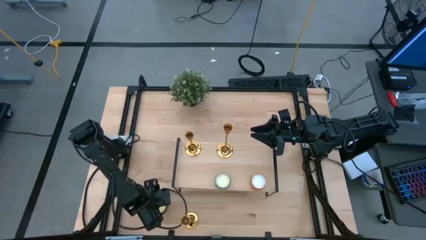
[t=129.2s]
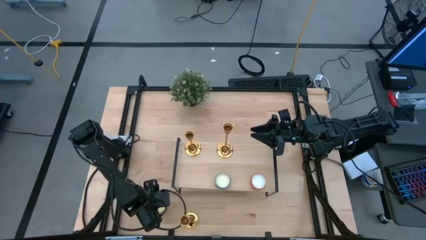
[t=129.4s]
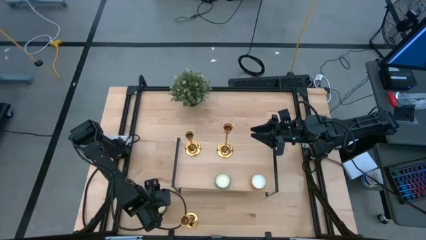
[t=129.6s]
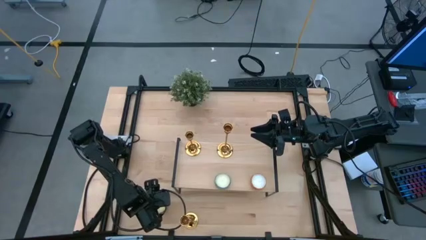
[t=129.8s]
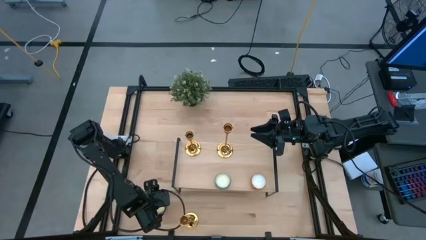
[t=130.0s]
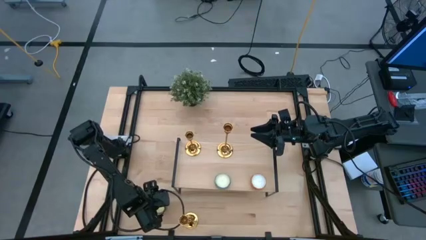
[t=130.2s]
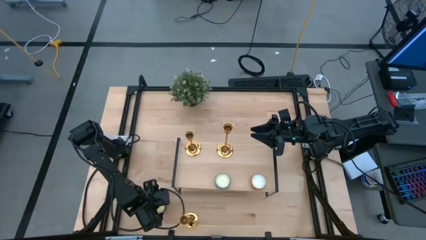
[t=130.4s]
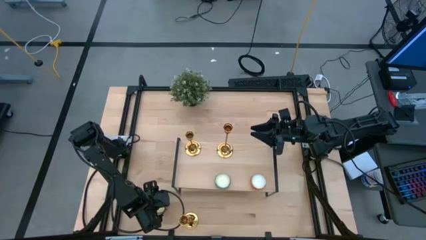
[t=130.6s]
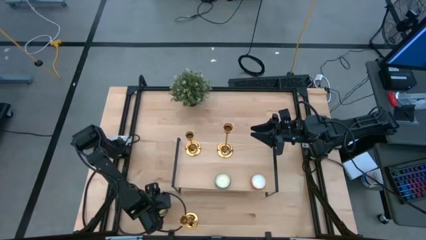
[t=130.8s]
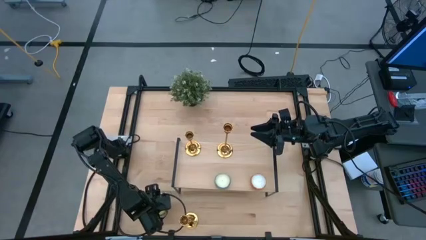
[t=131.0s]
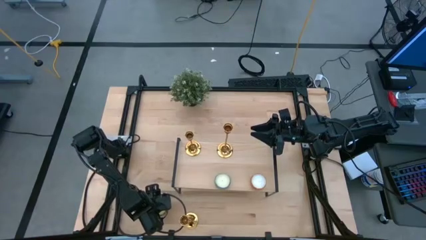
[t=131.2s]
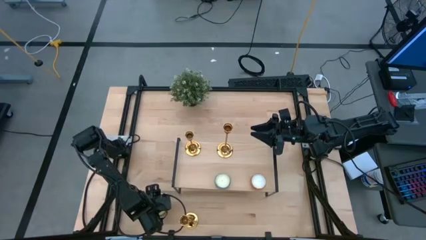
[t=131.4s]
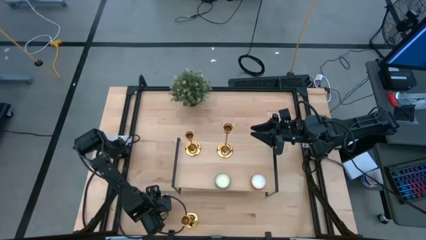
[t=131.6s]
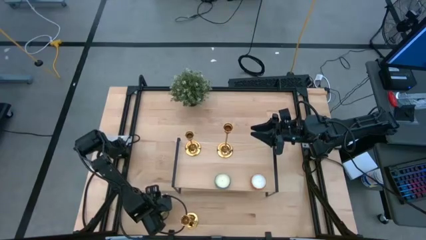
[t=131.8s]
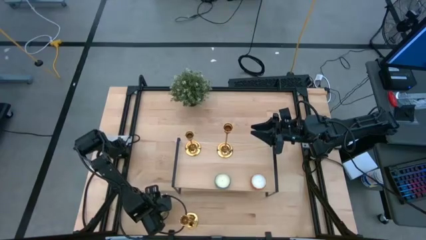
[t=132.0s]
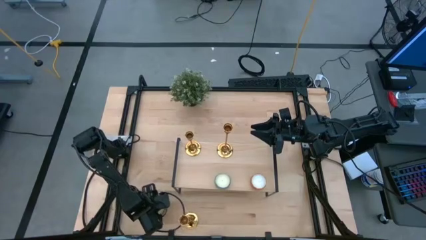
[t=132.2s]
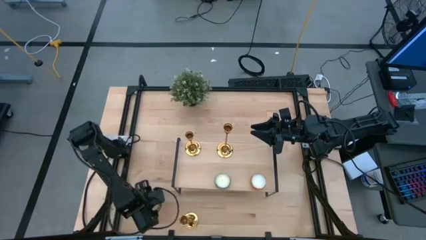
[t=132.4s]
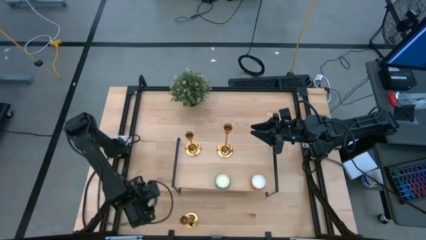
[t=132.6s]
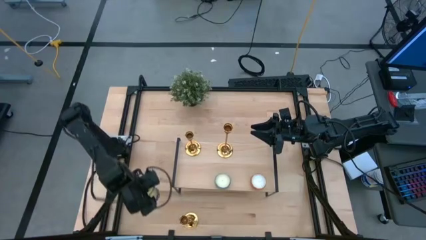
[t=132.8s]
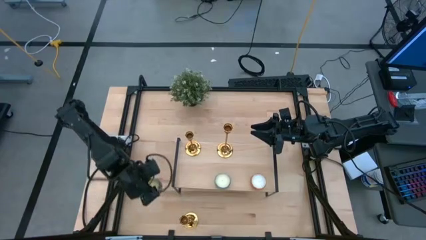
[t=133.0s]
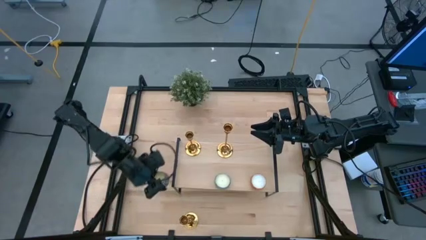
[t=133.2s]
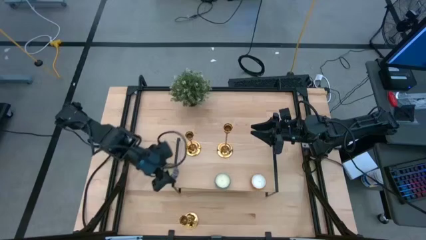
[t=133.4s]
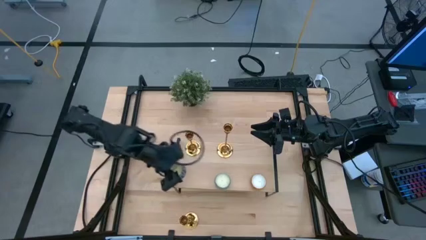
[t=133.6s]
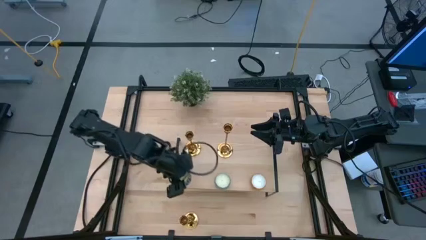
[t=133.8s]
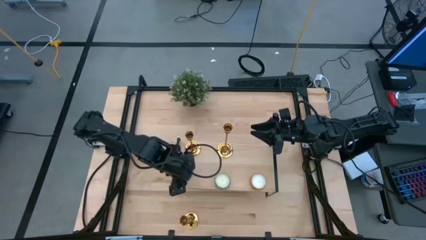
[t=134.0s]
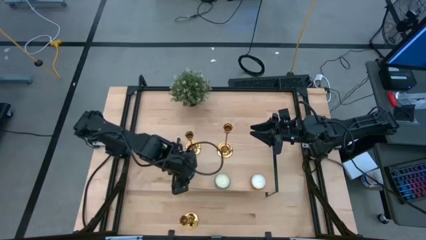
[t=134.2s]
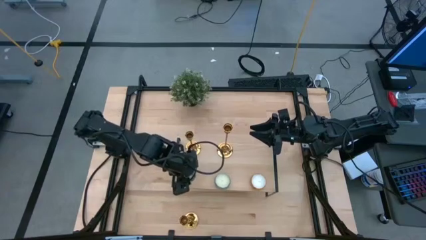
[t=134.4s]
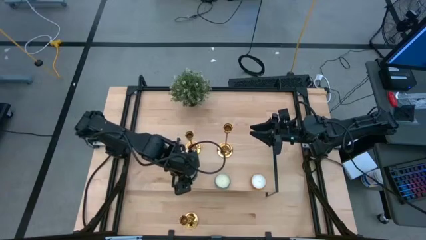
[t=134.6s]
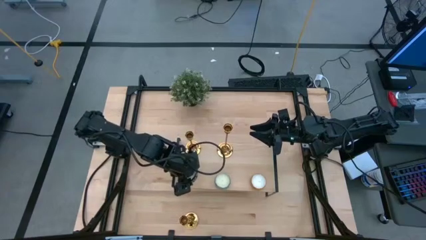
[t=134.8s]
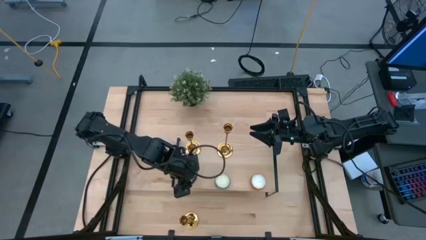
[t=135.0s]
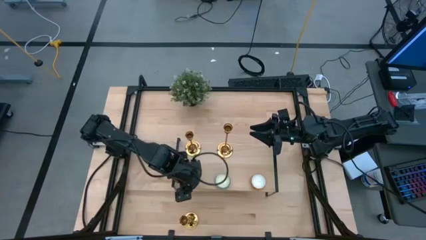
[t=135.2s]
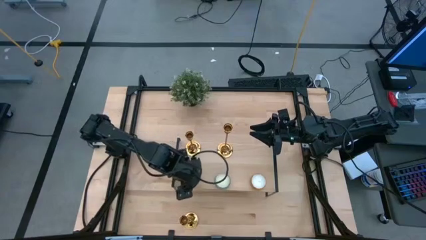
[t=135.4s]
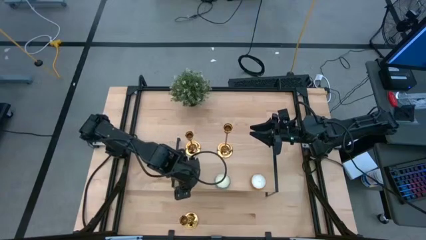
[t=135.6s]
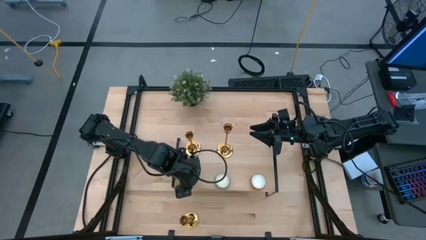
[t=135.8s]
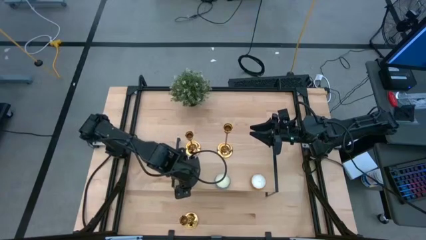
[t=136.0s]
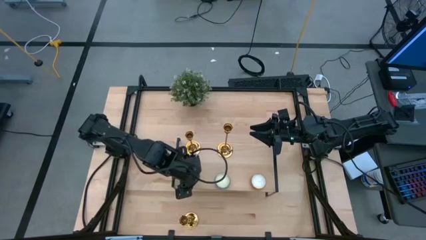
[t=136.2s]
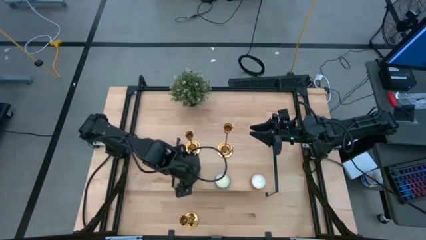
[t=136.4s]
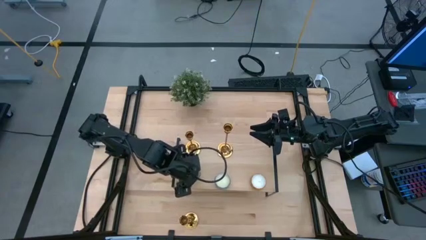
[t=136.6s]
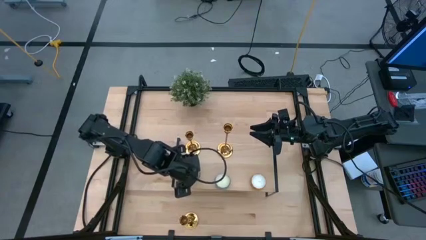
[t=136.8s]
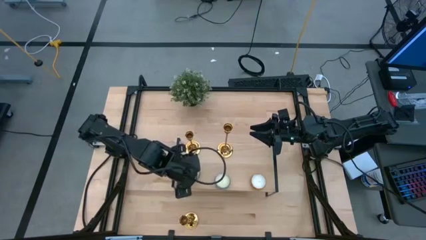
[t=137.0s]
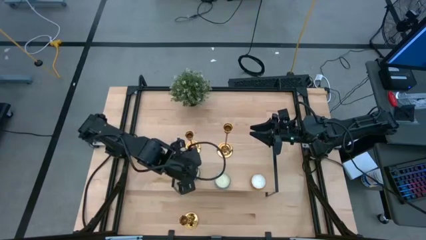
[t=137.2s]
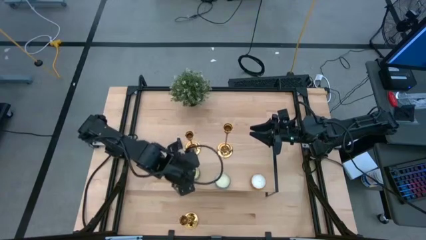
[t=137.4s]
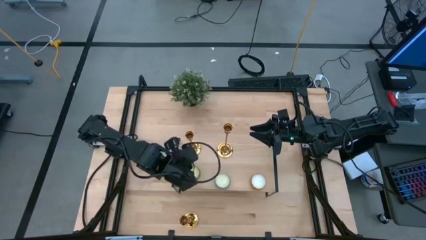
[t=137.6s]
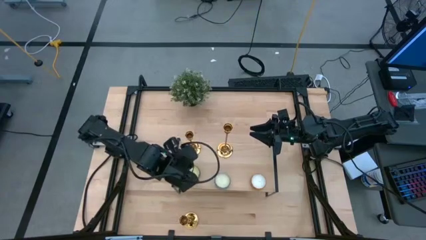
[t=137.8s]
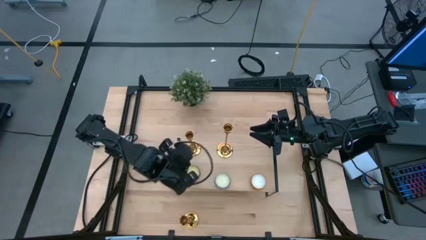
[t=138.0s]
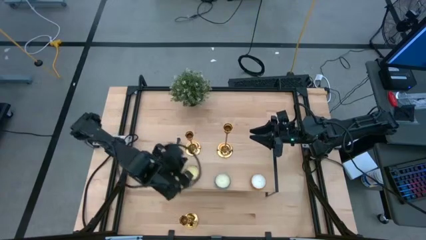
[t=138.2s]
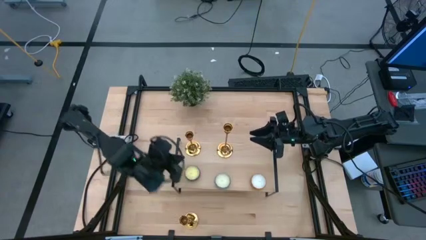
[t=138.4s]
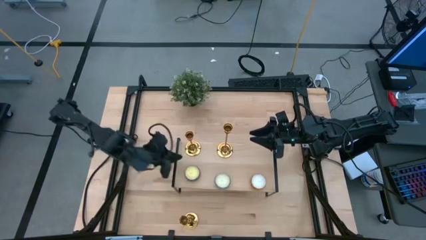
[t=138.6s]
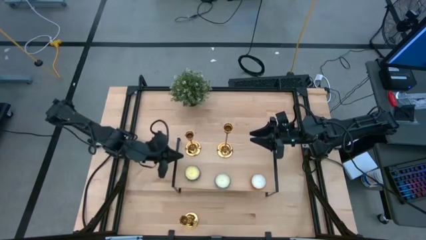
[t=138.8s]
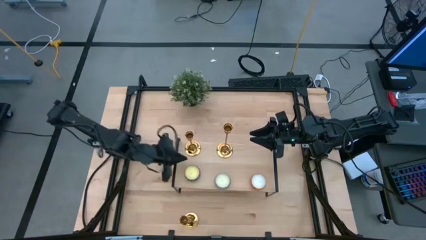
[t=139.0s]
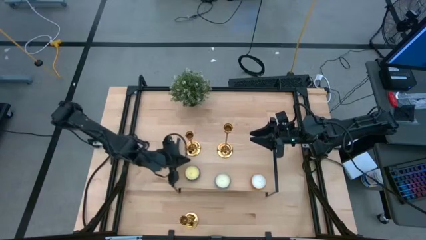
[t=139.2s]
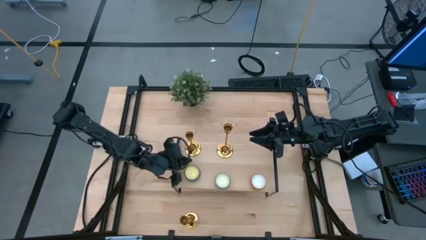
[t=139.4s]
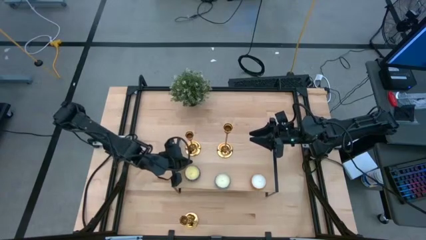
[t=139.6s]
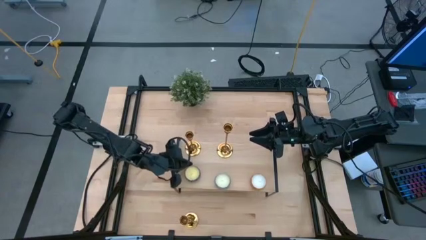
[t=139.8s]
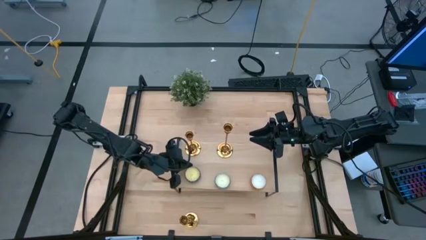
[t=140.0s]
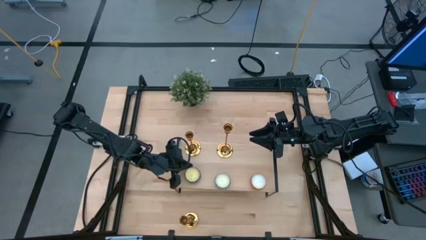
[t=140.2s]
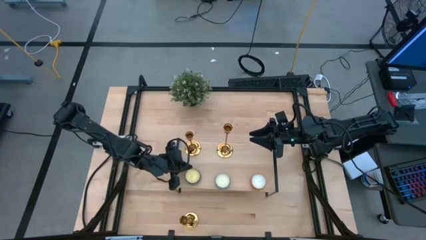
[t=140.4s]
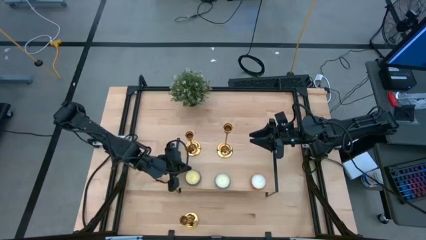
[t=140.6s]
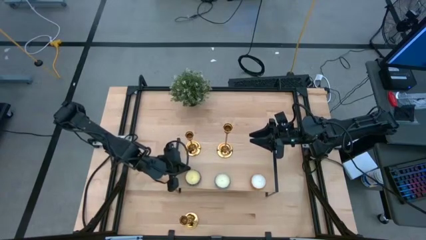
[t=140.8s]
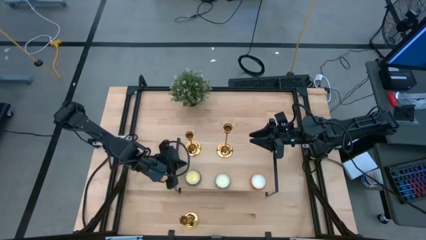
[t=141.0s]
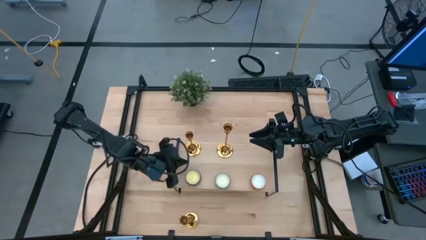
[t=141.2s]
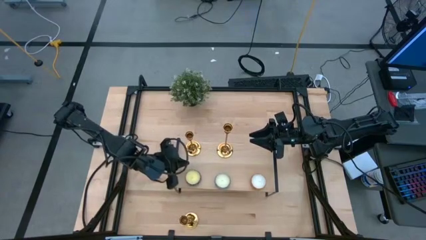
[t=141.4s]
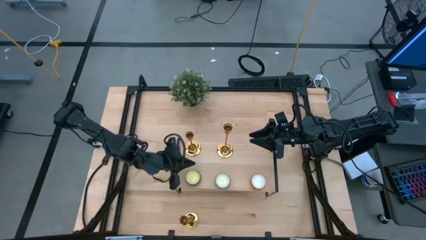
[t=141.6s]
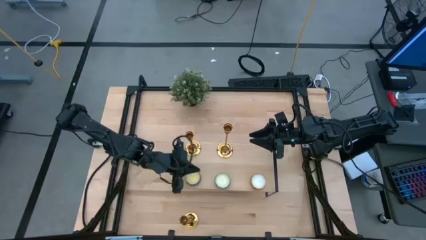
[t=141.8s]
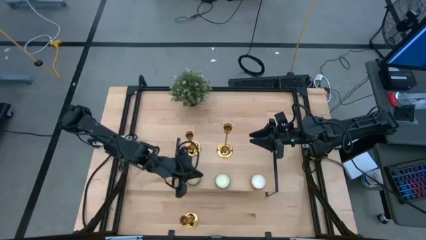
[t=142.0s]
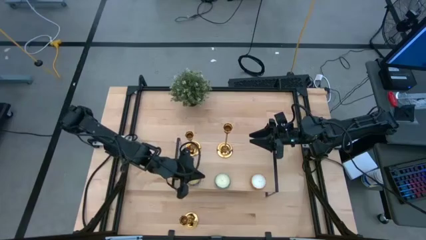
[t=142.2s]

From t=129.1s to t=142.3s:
Task: Pick & Place candle stick holders
Put the red scented candle on the shelf aligned with the blue scented candle

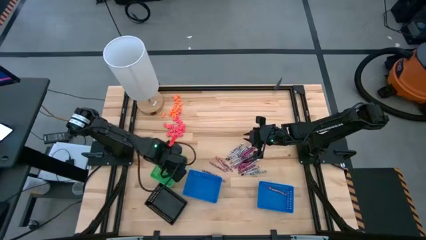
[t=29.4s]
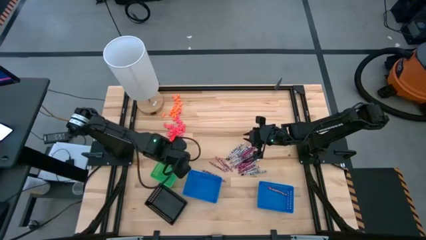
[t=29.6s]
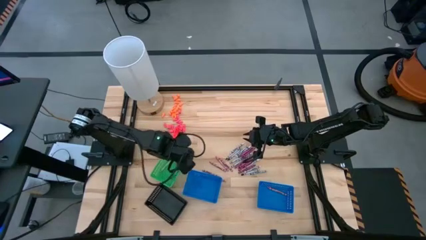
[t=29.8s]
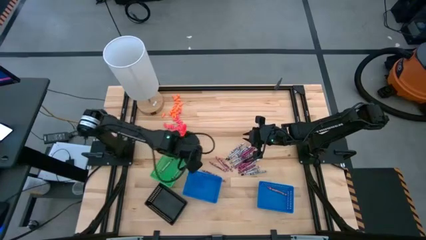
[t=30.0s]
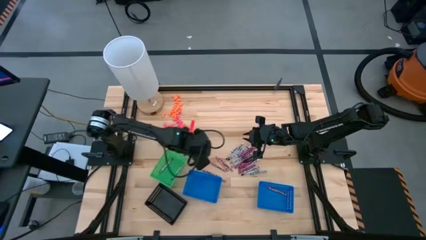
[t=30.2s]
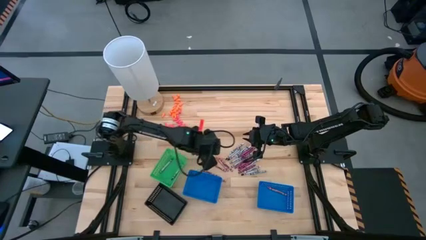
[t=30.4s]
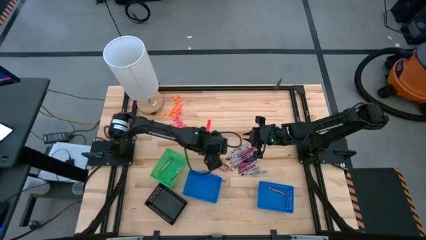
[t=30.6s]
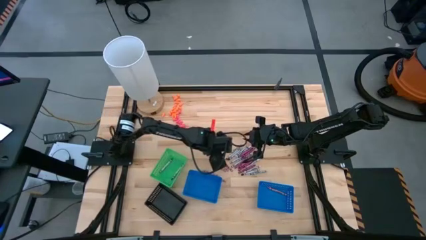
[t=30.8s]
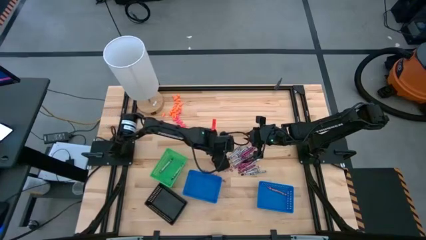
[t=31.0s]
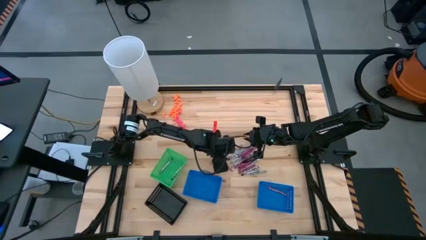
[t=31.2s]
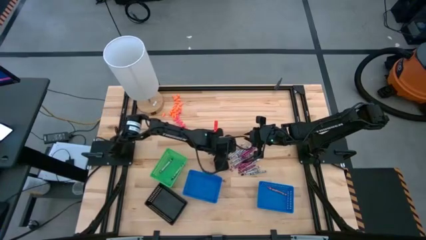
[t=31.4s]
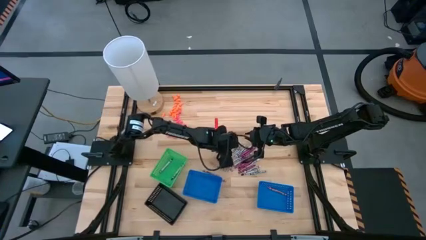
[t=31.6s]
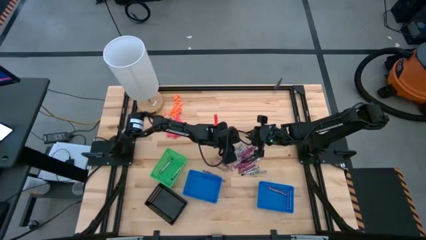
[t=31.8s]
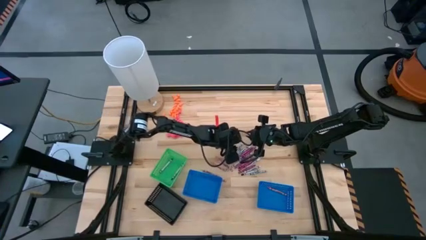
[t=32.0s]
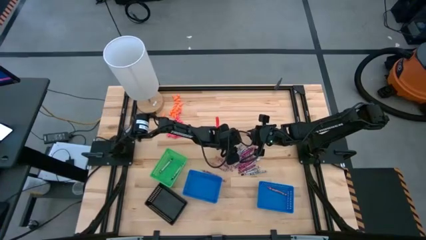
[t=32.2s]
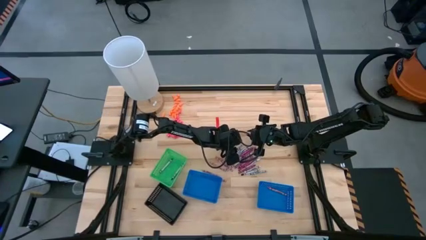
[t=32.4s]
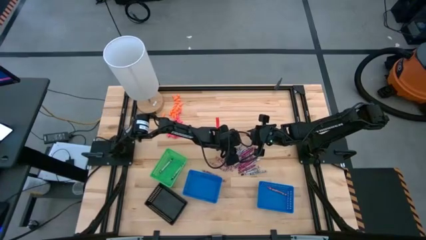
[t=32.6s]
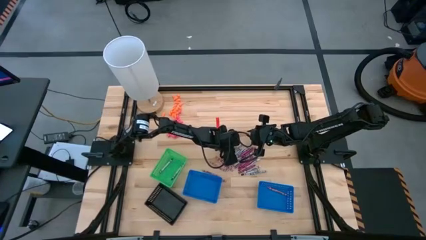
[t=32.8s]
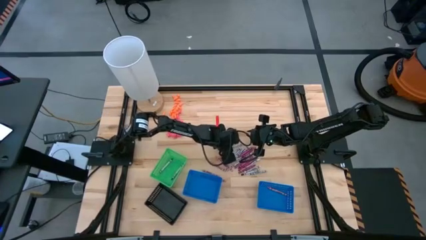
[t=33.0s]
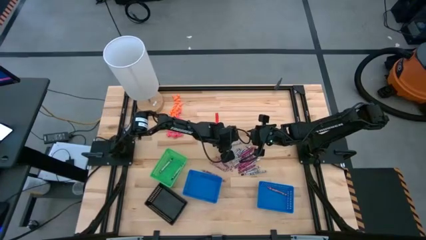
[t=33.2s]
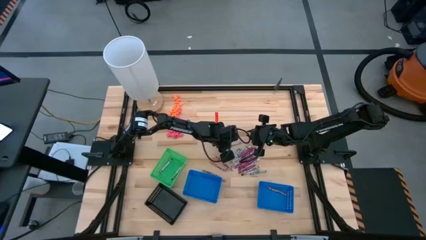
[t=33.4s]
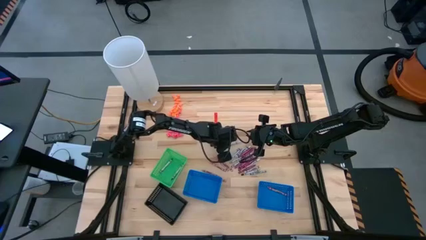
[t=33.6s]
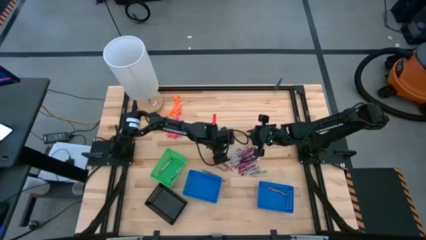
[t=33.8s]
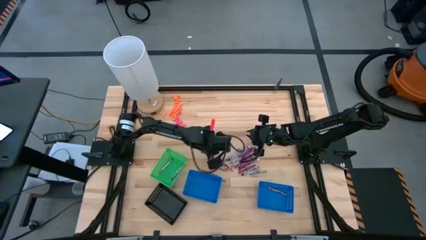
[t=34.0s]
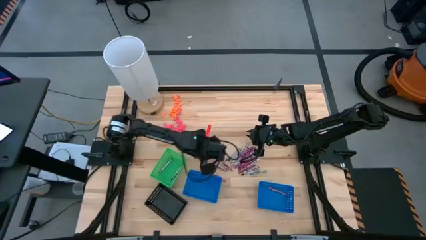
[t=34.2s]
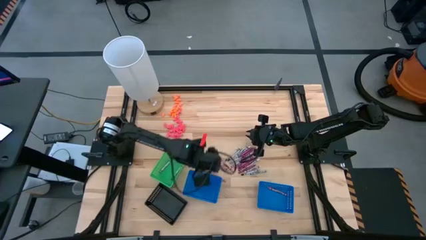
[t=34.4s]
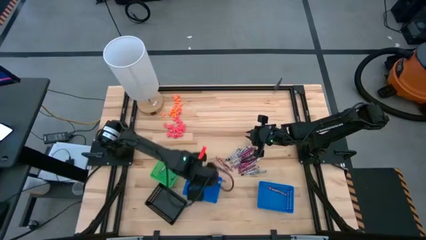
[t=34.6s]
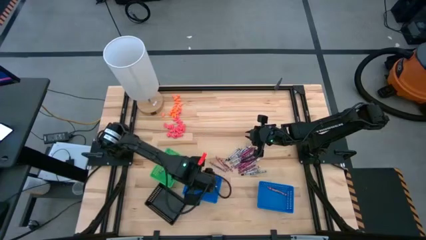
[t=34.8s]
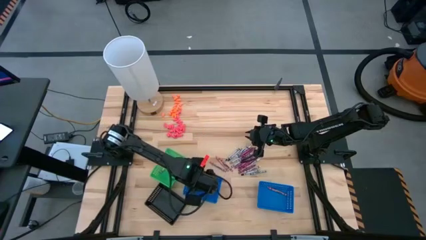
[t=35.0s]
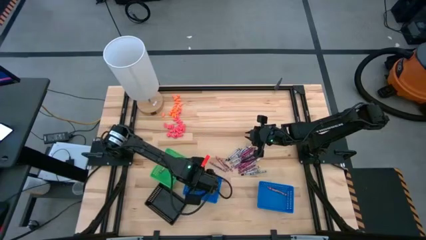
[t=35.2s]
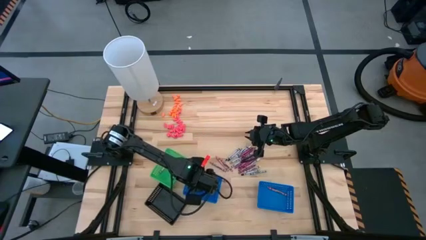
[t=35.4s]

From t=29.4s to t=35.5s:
Task: Sort crayons
Put the white crayon into the left blue basket
